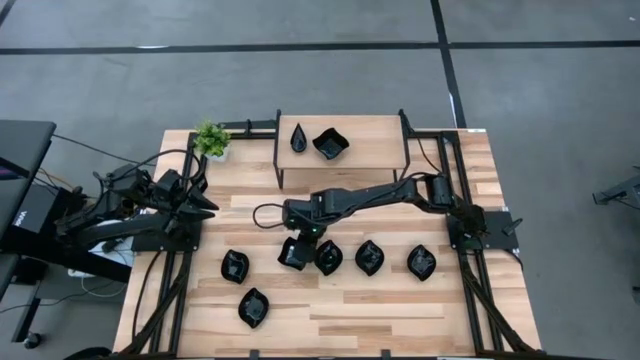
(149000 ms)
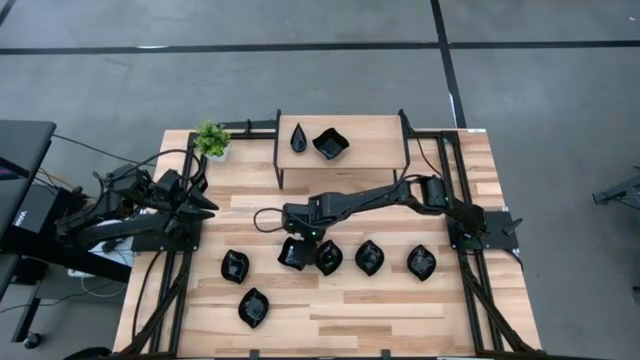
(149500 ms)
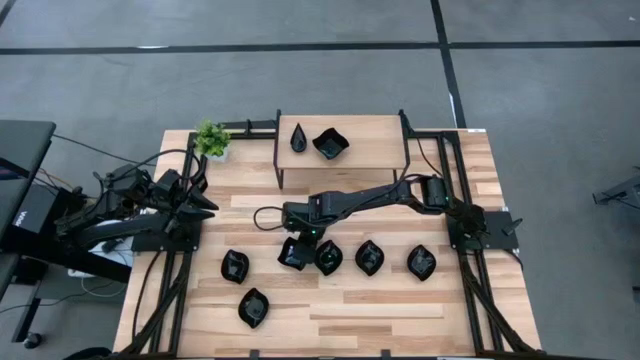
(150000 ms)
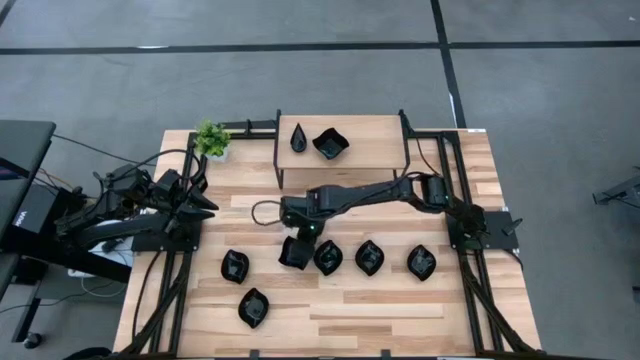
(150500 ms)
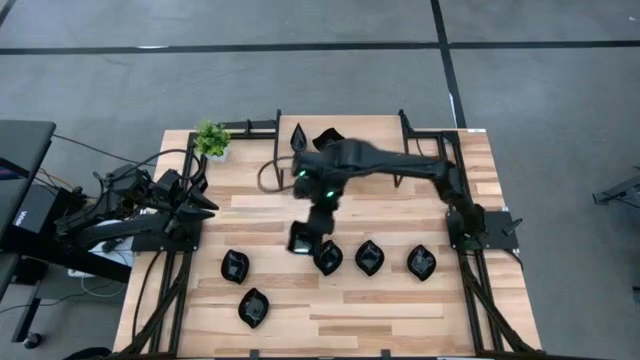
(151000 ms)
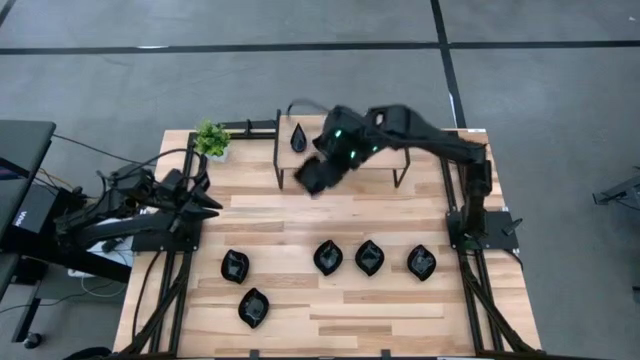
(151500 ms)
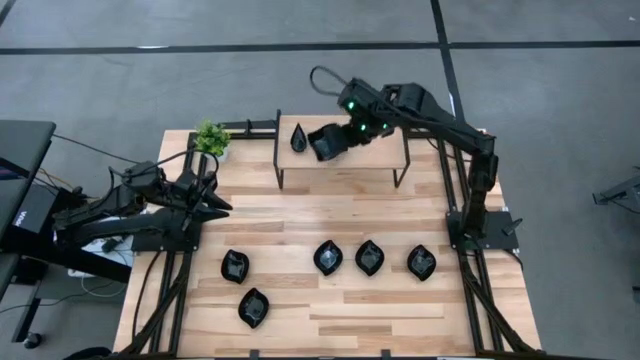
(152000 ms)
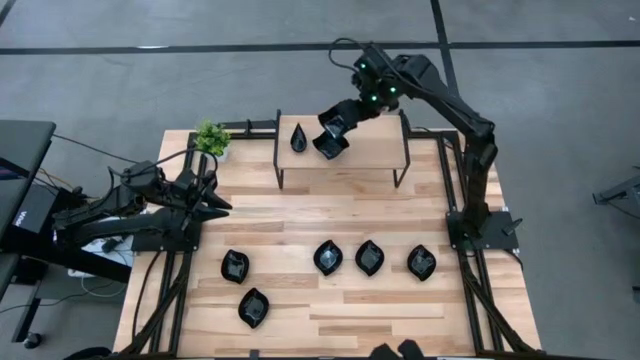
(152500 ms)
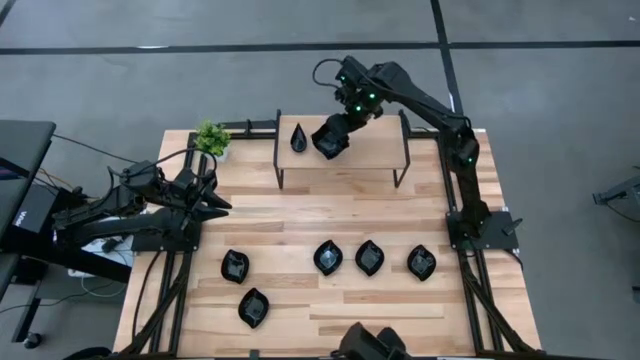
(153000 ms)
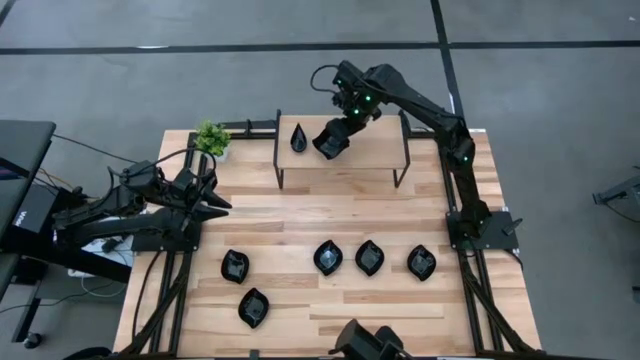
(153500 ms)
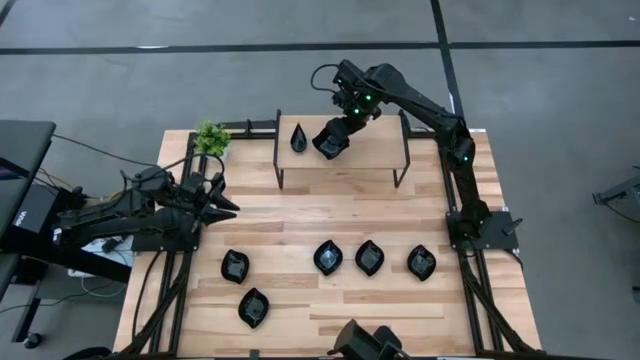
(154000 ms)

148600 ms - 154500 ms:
Task: Pick & Place Mini shaped plates
Stack the black distorted square plate on top of the black distorted square plates on the shelf

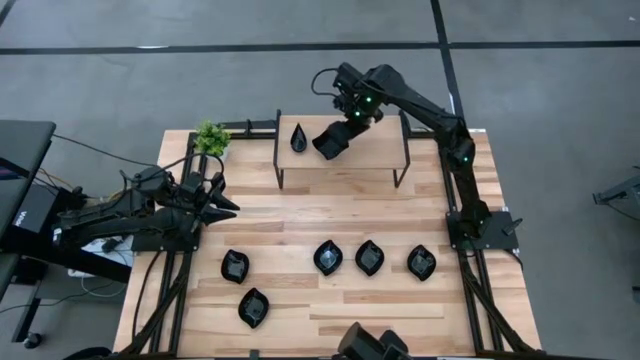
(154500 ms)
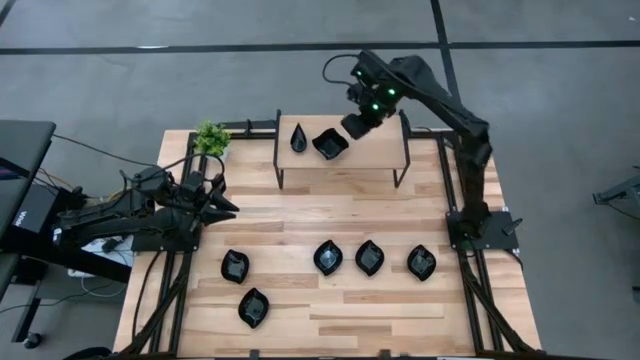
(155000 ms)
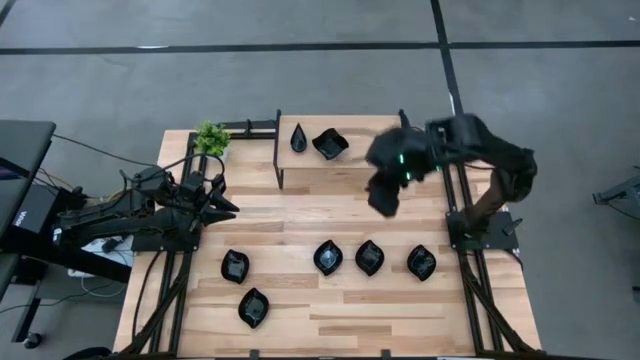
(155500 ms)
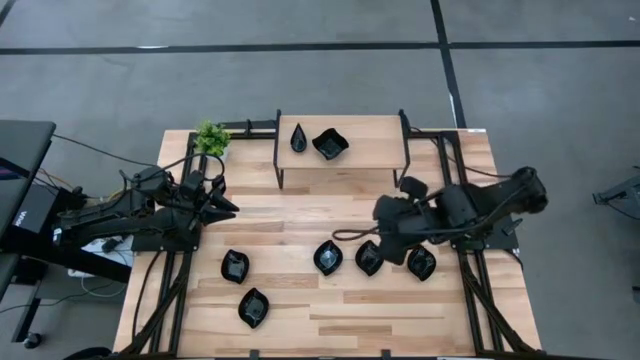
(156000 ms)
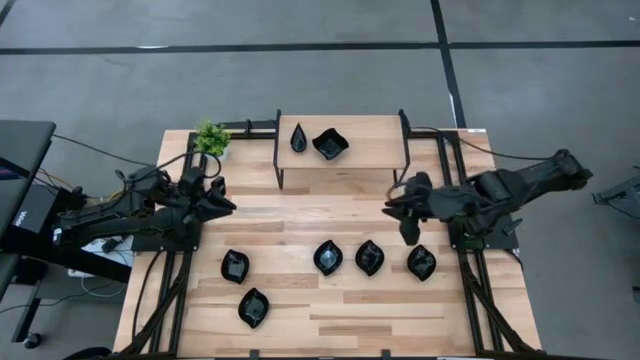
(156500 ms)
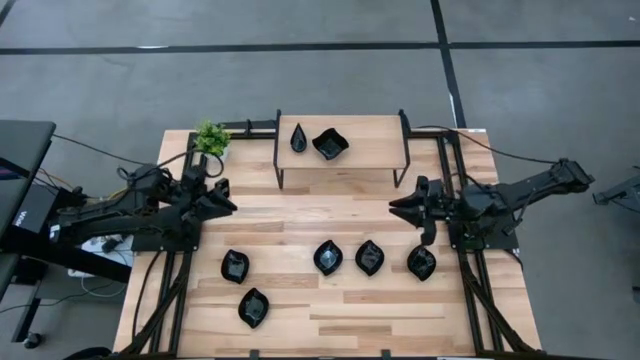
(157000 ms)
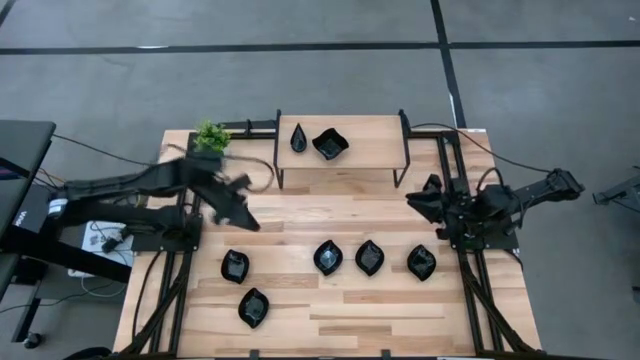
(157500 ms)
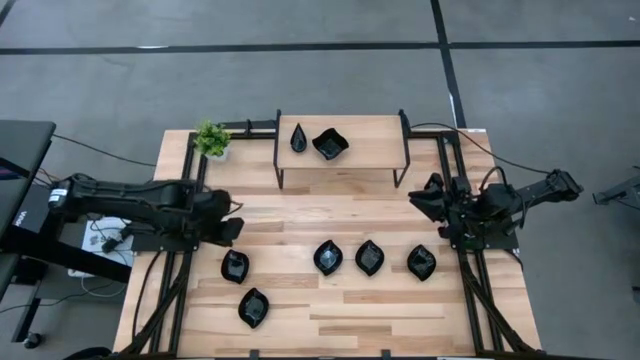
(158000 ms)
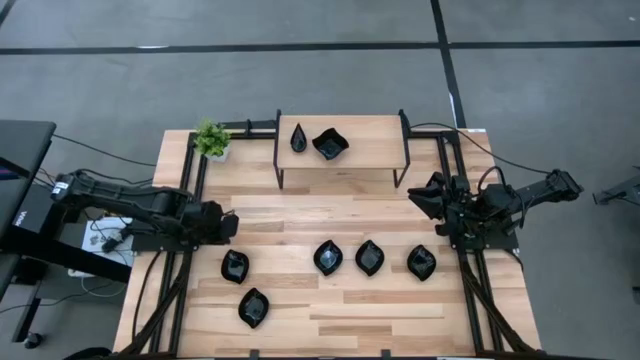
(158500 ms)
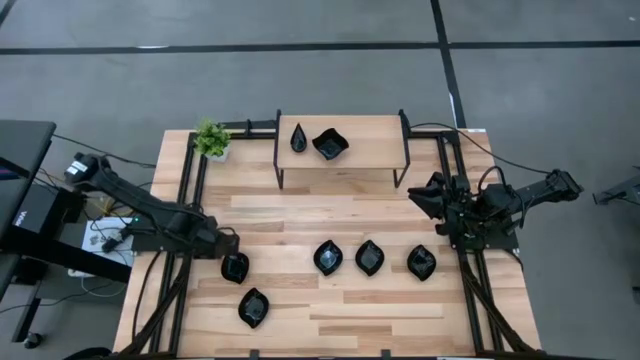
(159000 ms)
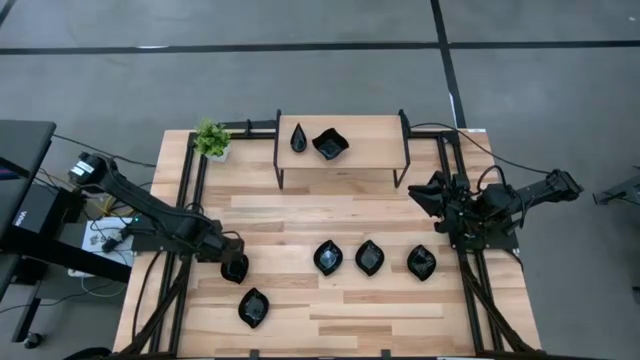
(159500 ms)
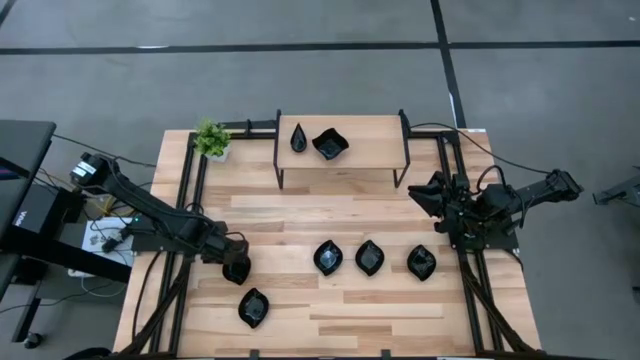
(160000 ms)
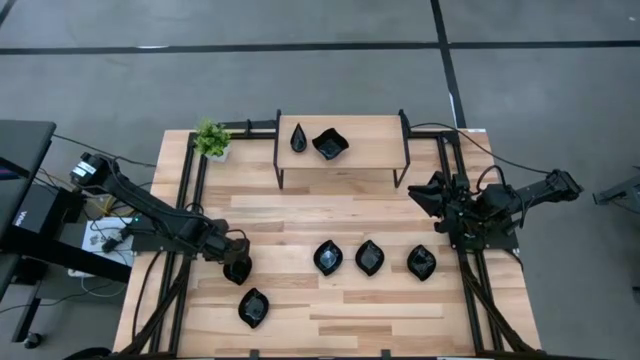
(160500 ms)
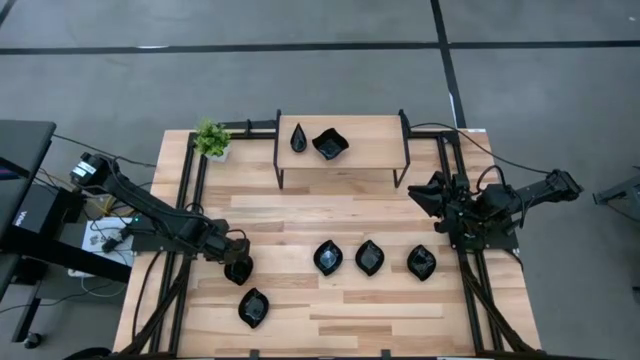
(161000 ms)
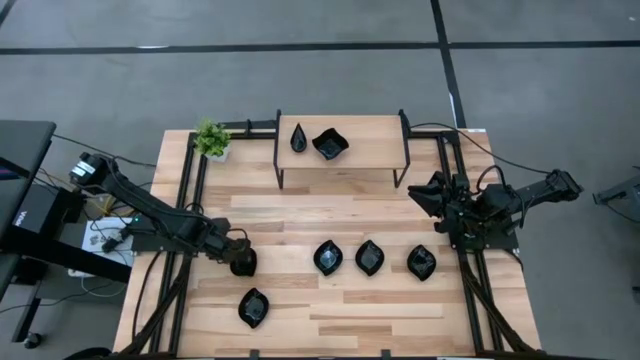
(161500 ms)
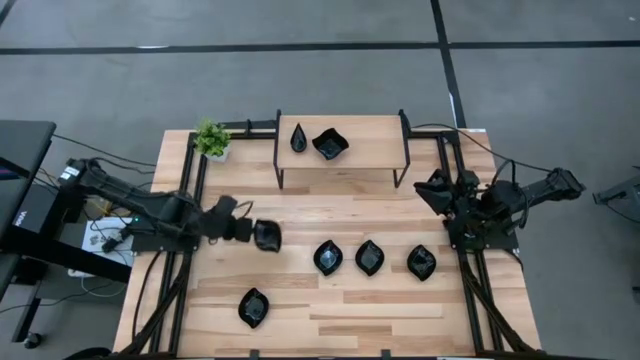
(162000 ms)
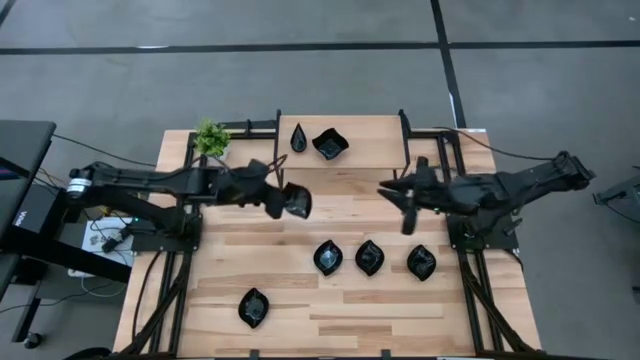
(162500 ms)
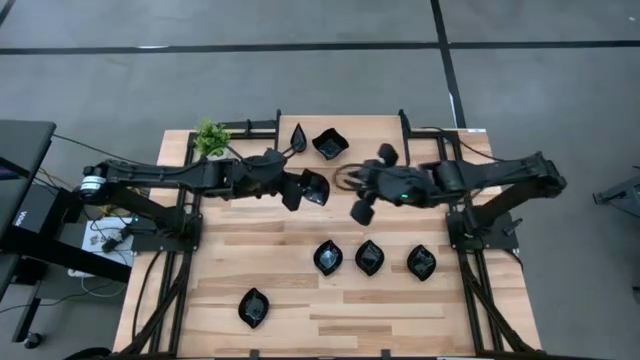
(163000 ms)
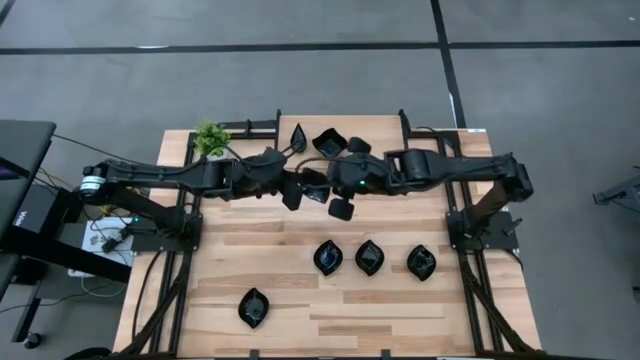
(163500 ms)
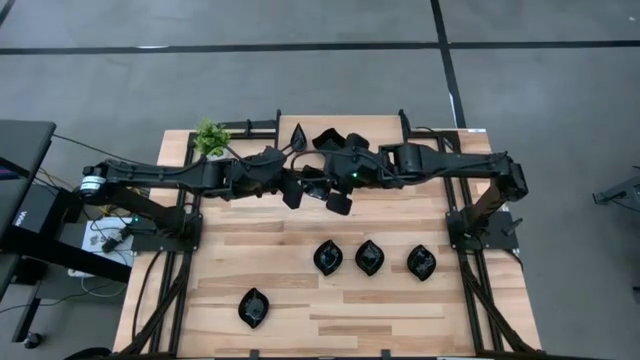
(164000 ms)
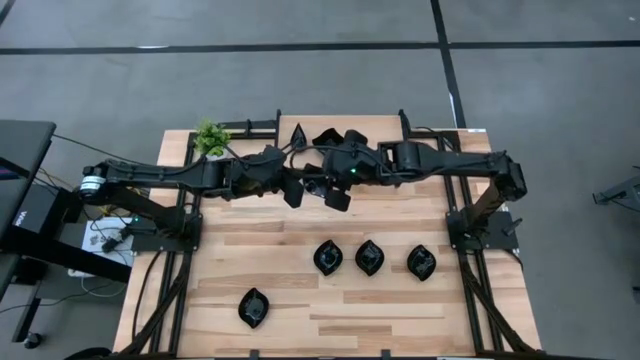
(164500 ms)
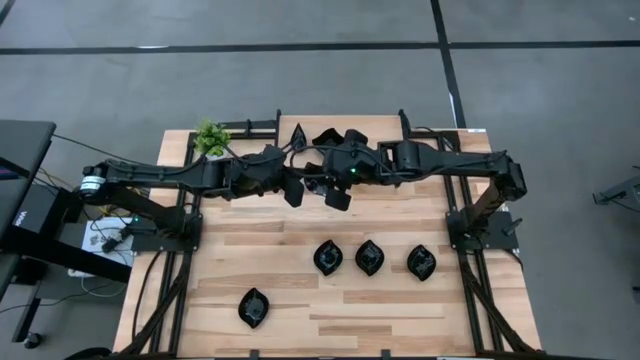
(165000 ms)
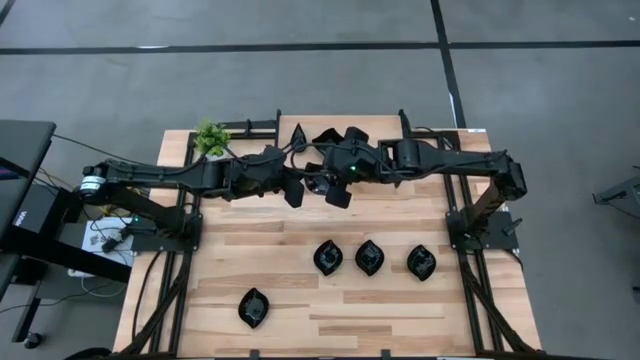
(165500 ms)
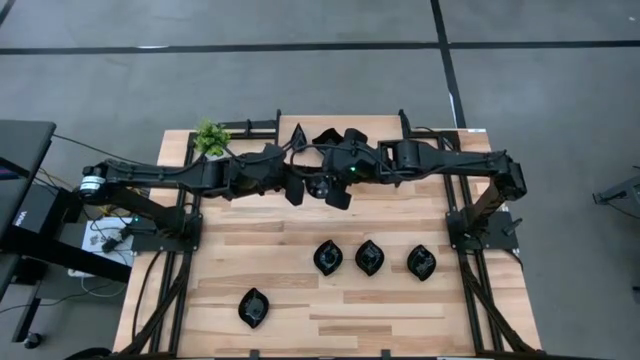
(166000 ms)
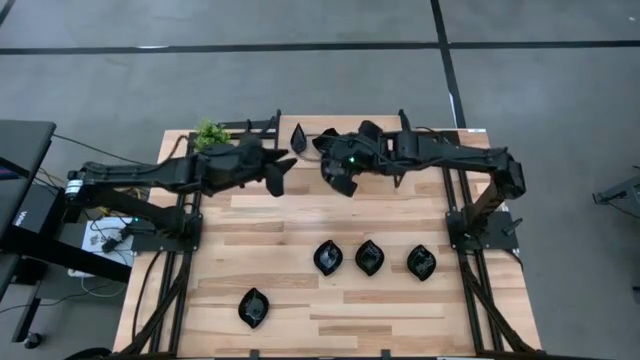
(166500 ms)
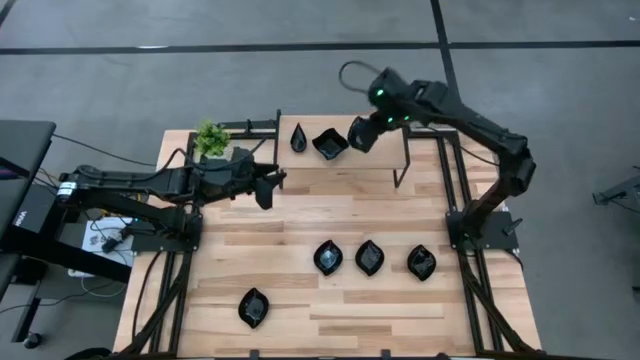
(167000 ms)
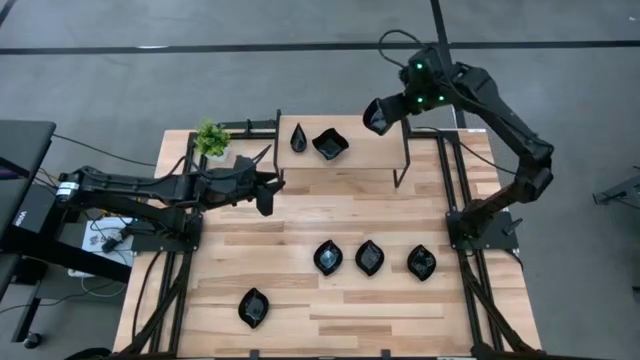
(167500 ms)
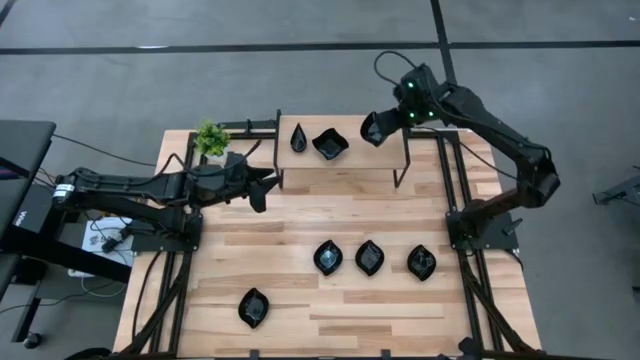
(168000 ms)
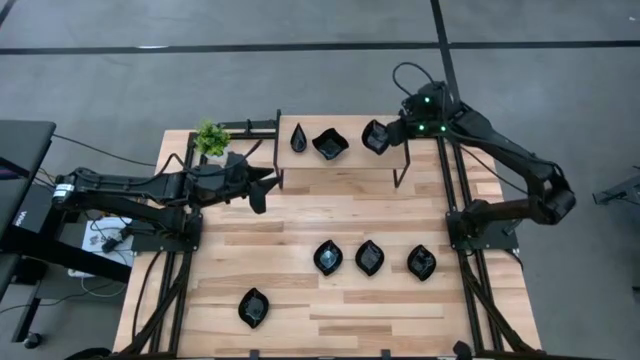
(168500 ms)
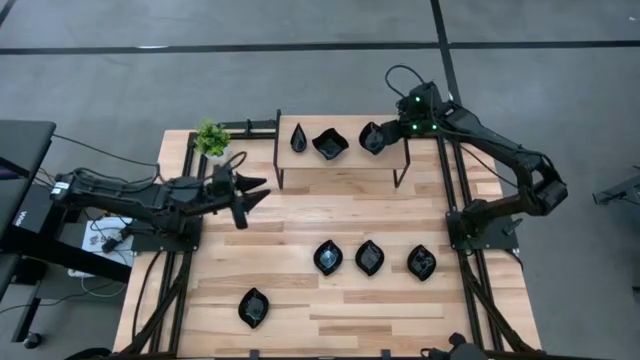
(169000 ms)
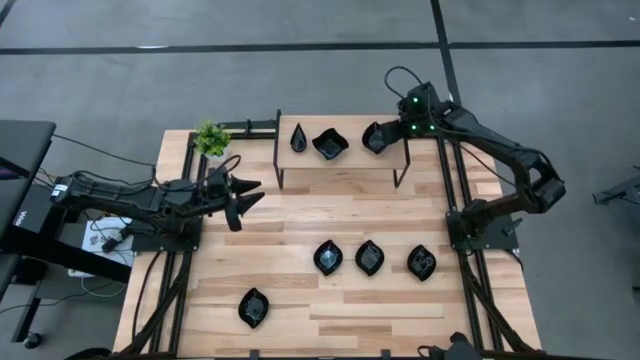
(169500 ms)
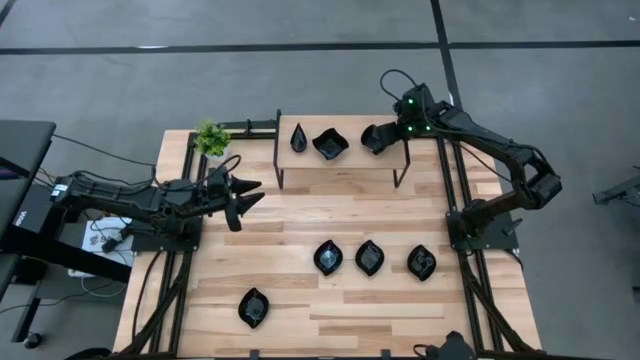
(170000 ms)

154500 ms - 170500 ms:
Put the black leaf shaped plate on the shelf

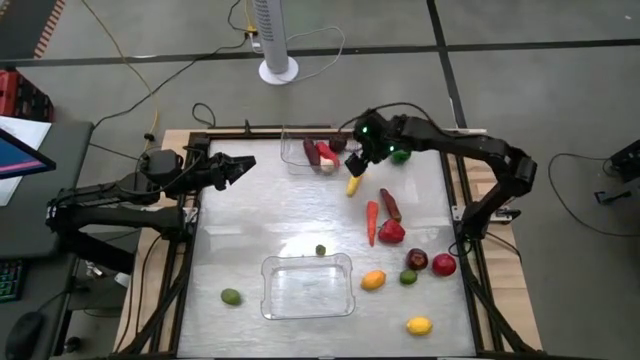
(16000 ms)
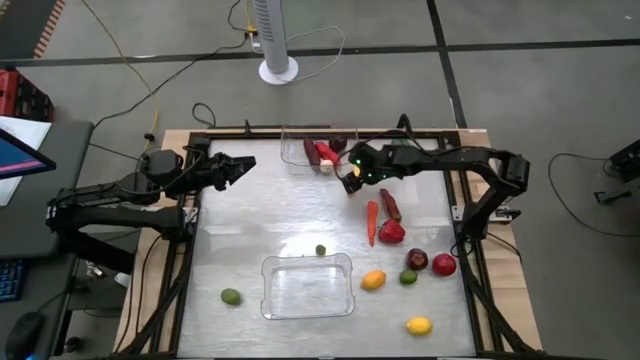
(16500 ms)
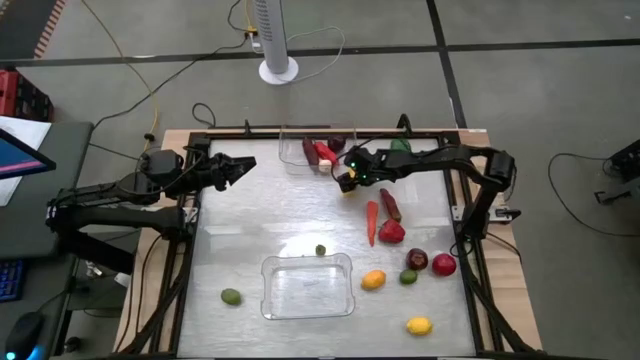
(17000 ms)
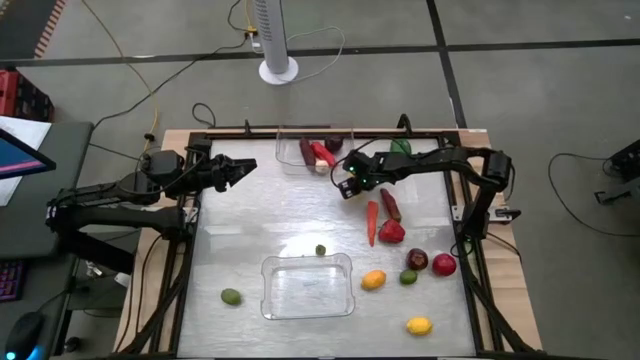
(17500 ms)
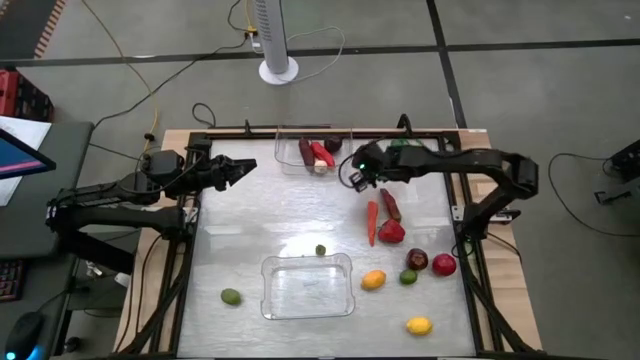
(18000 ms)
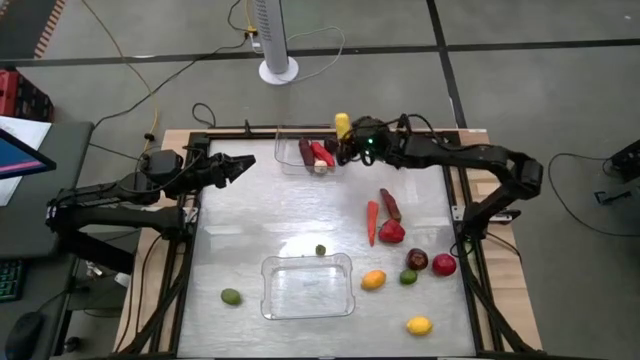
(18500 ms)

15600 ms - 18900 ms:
Task: Sort produce into baskets
Put the corn into the top transparent bin
